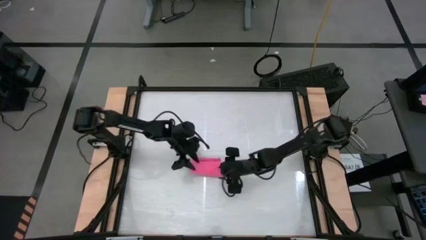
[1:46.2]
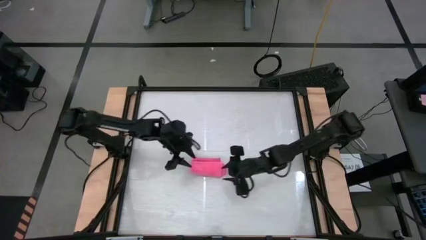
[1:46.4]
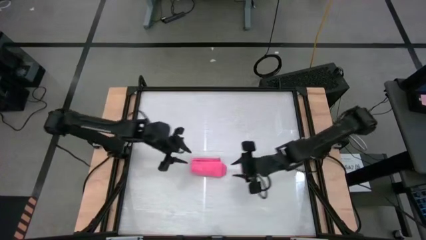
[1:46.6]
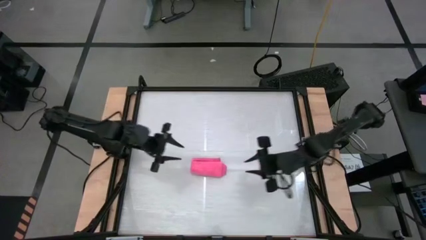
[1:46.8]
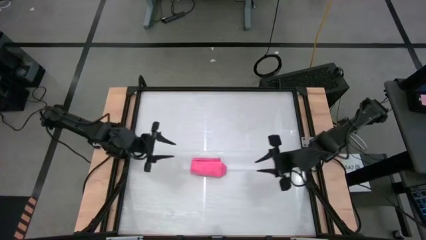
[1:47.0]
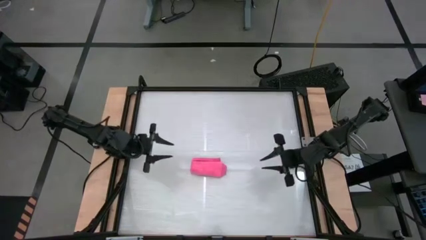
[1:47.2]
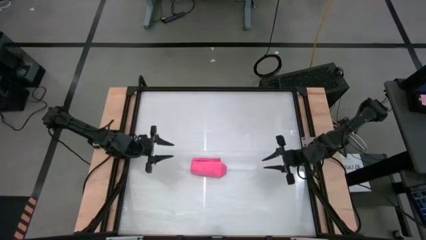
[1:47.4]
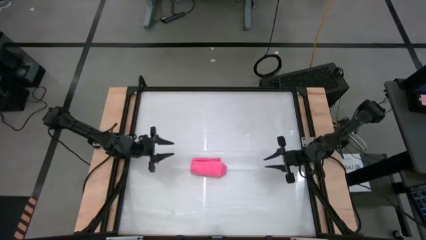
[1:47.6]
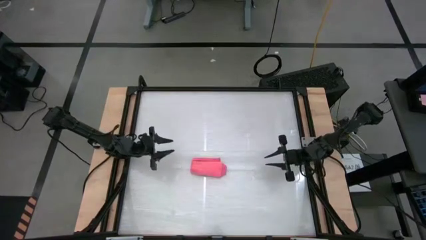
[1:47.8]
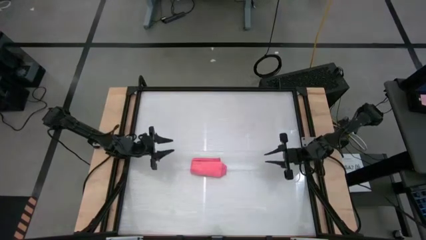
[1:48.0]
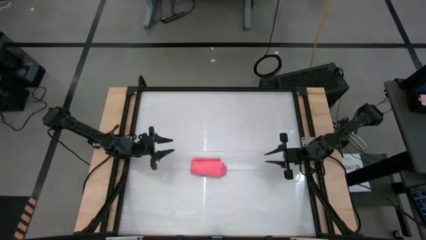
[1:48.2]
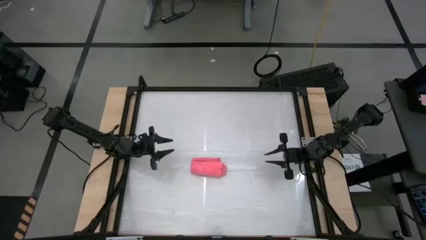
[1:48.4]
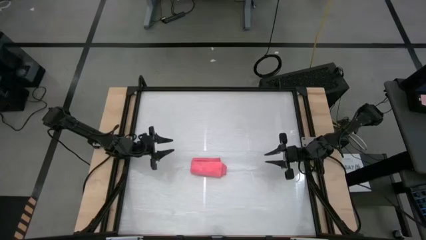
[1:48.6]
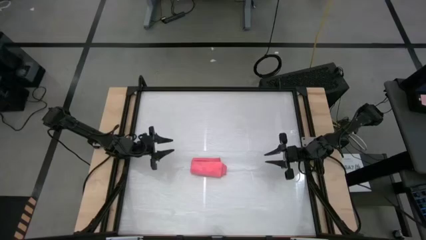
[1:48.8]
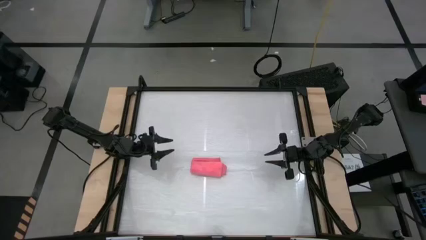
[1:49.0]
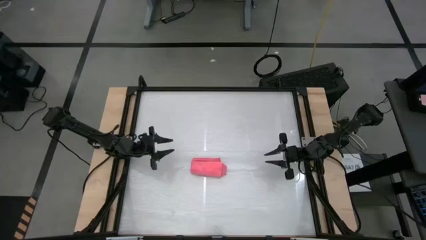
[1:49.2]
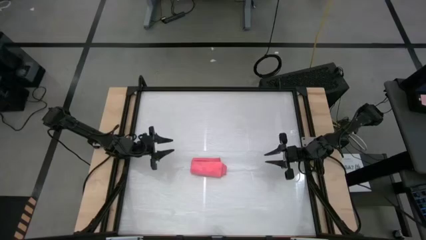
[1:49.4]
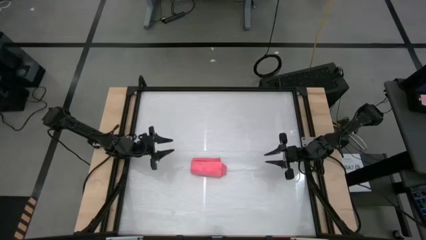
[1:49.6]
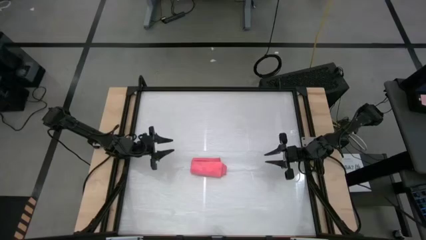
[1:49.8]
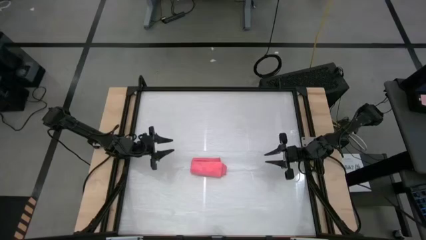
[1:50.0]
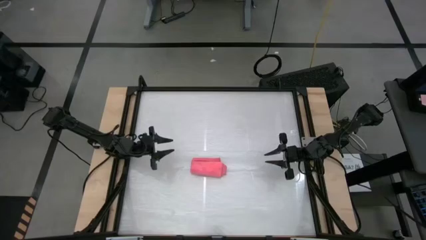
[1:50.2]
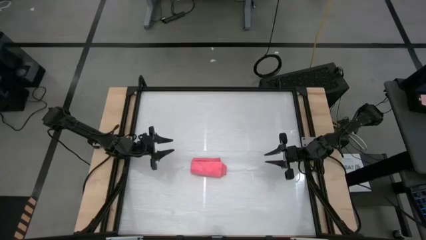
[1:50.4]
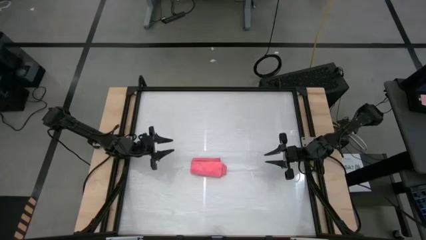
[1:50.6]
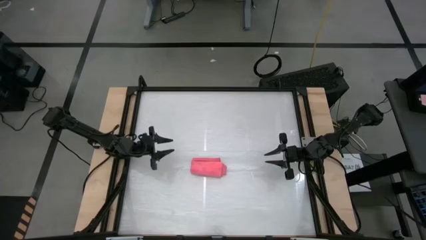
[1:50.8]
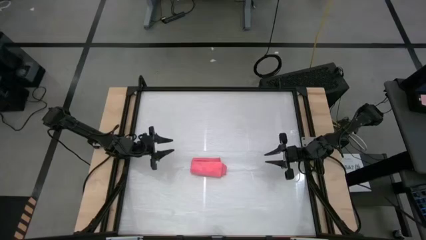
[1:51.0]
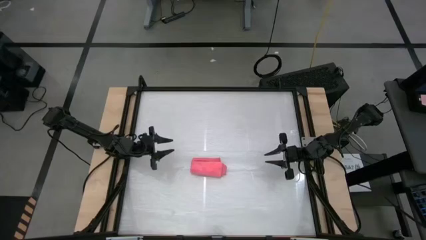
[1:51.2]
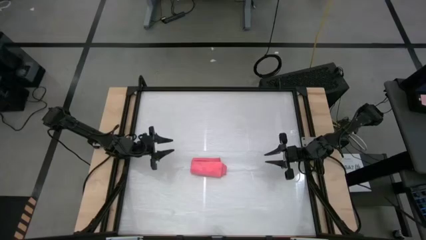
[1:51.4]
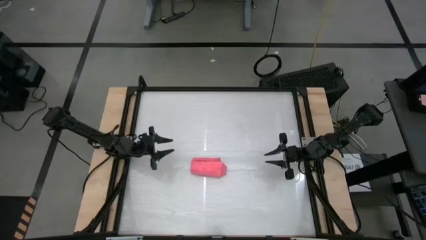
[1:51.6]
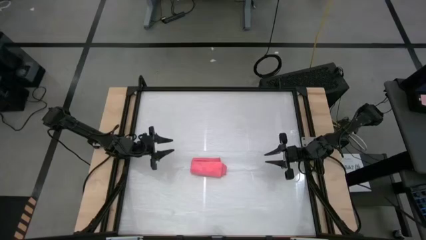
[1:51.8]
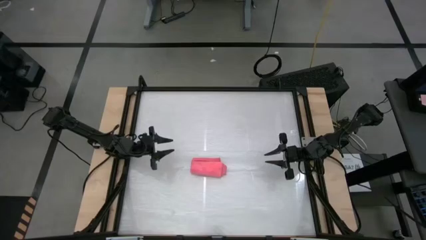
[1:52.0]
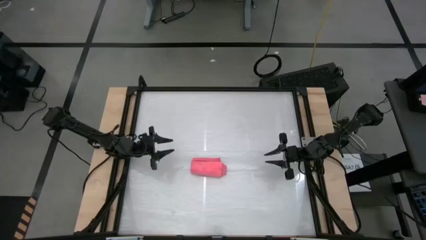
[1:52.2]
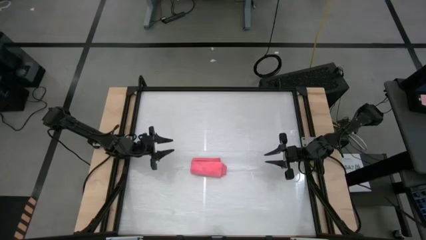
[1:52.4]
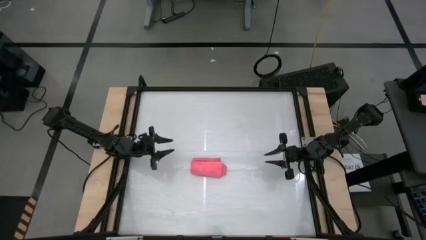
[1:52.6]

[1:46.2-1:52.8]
Task: Roll towel
Return to Home Position

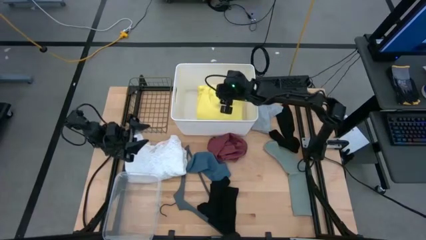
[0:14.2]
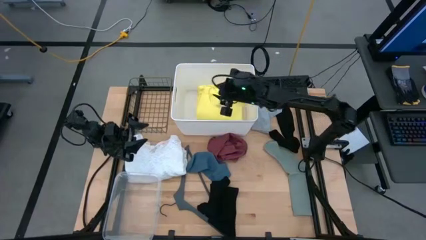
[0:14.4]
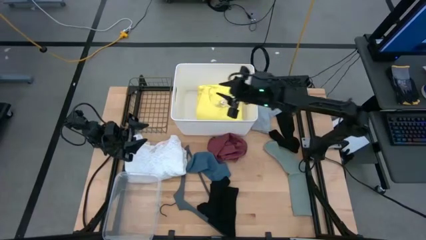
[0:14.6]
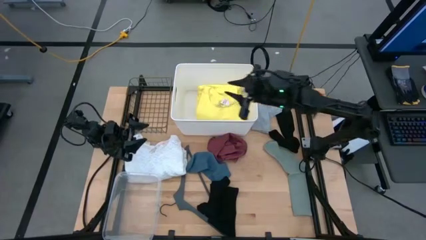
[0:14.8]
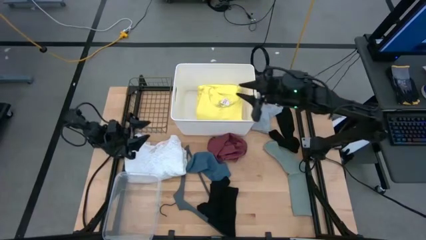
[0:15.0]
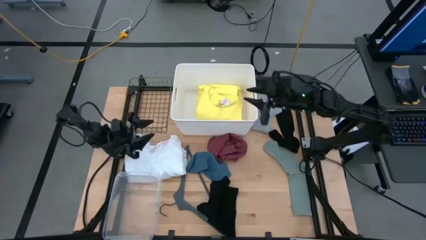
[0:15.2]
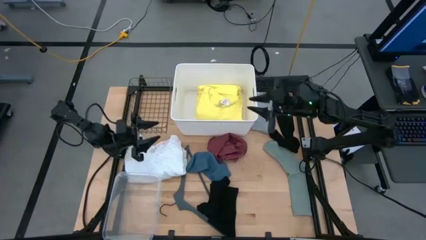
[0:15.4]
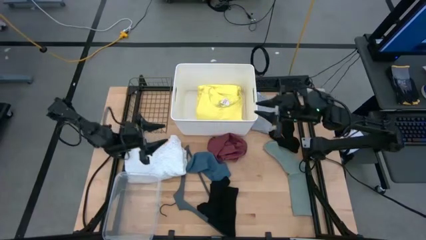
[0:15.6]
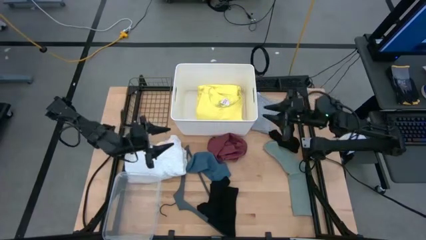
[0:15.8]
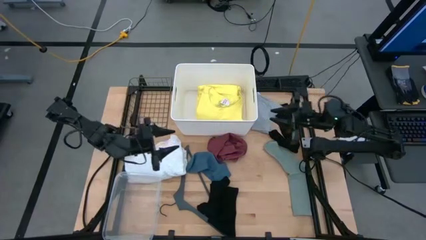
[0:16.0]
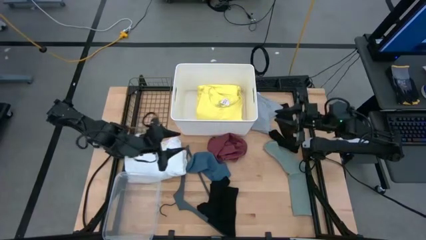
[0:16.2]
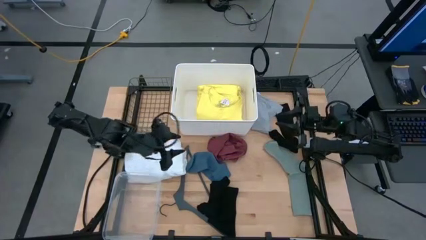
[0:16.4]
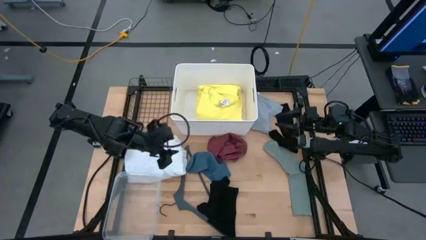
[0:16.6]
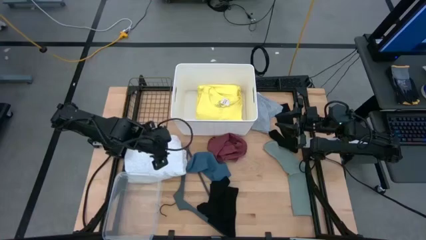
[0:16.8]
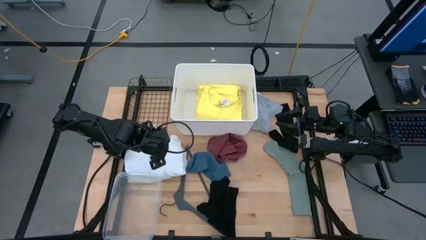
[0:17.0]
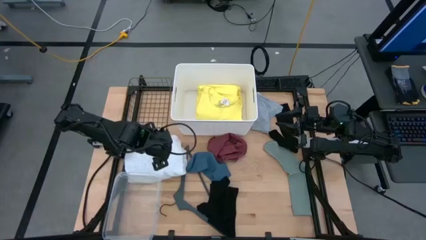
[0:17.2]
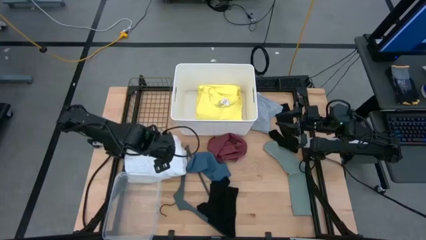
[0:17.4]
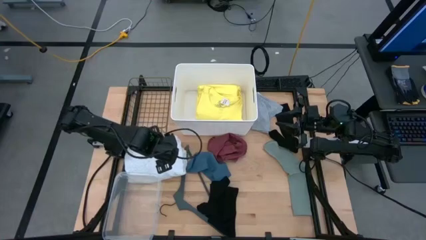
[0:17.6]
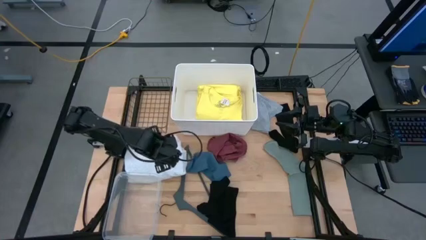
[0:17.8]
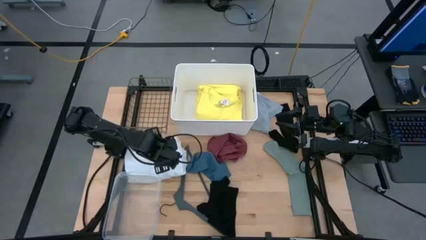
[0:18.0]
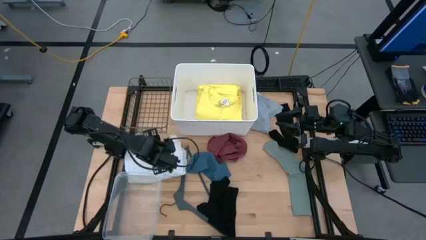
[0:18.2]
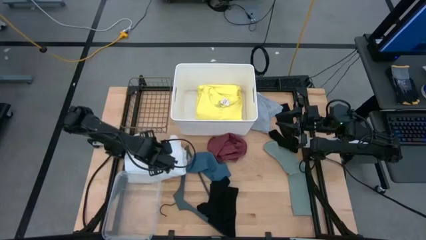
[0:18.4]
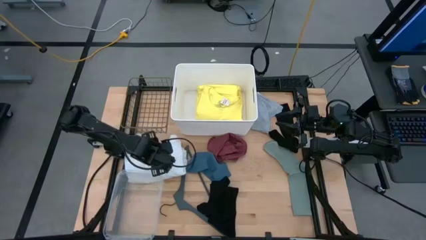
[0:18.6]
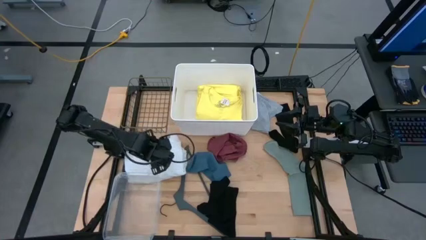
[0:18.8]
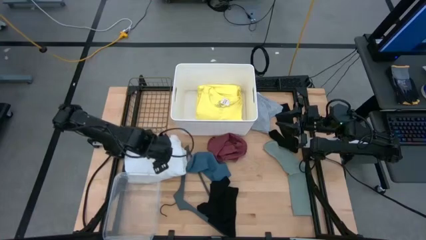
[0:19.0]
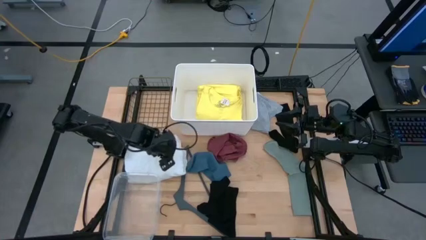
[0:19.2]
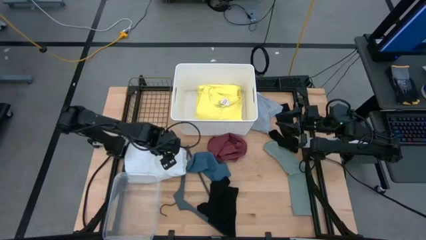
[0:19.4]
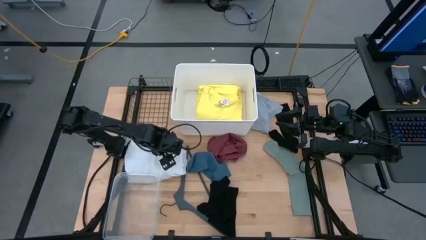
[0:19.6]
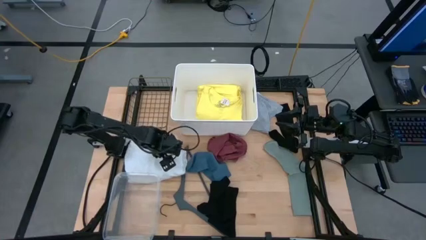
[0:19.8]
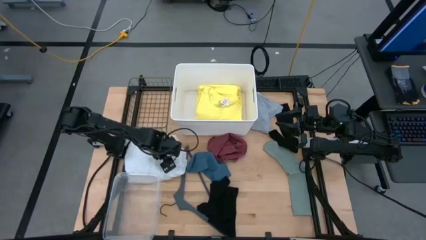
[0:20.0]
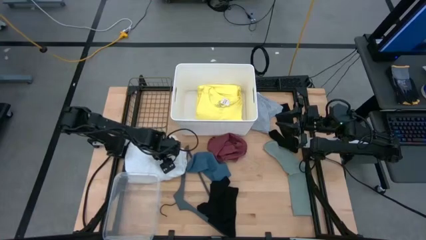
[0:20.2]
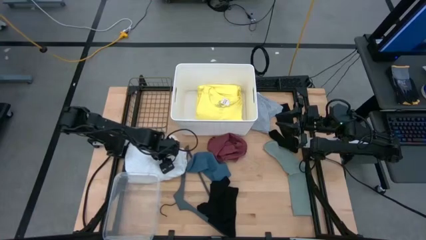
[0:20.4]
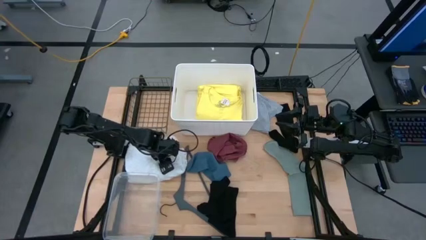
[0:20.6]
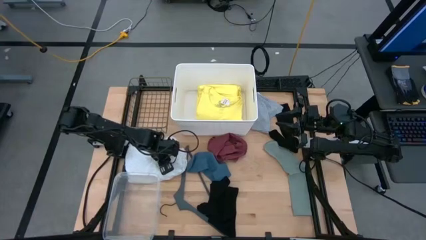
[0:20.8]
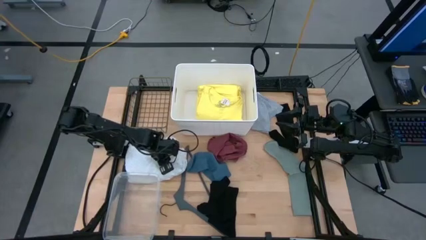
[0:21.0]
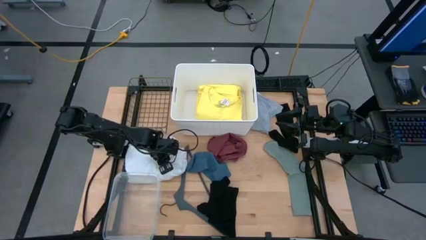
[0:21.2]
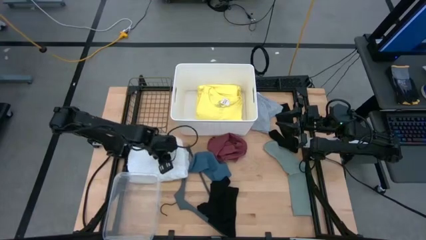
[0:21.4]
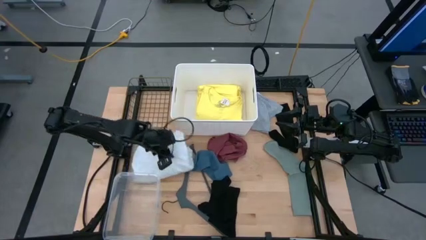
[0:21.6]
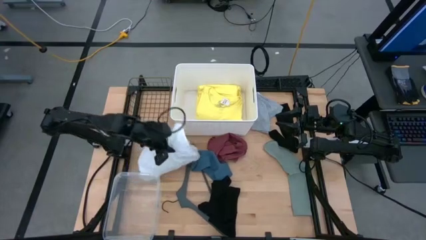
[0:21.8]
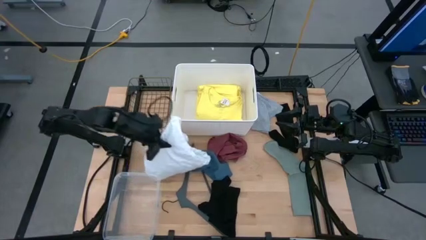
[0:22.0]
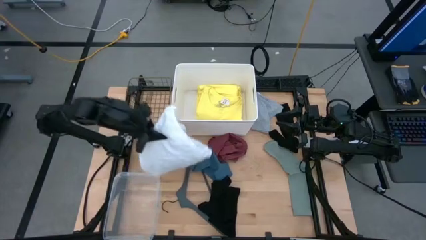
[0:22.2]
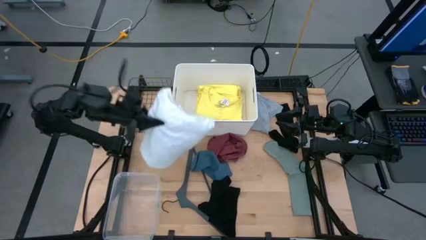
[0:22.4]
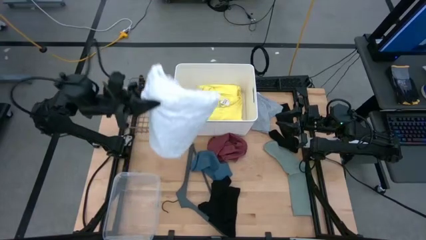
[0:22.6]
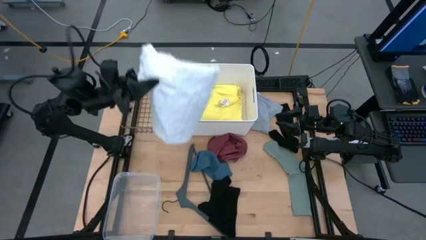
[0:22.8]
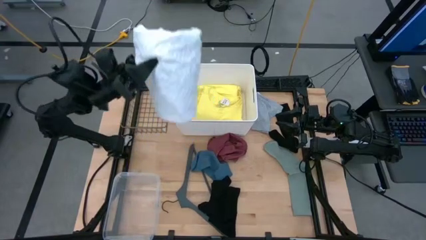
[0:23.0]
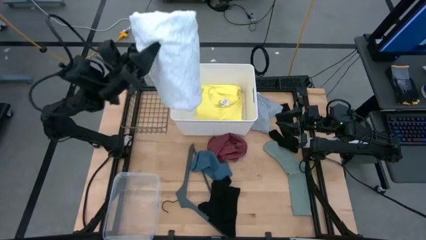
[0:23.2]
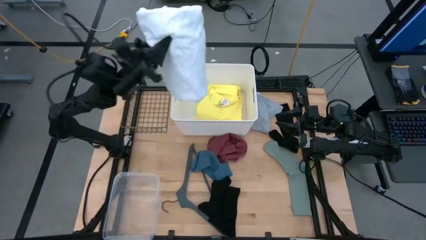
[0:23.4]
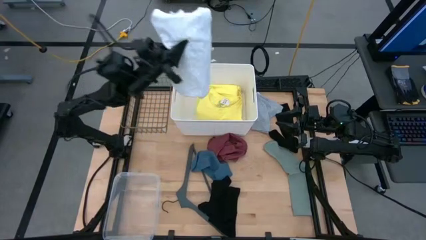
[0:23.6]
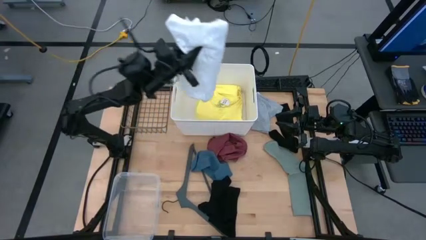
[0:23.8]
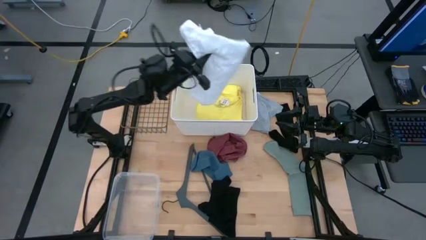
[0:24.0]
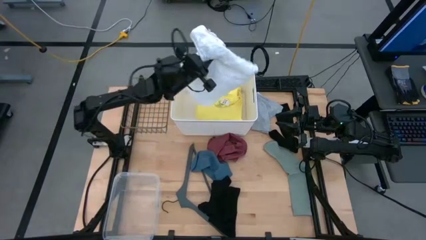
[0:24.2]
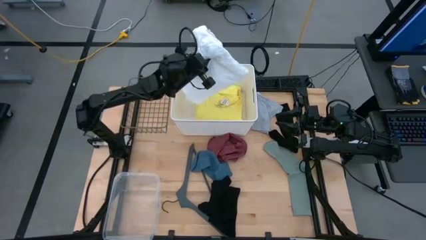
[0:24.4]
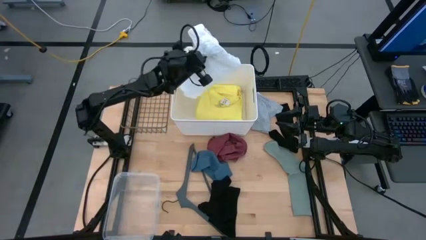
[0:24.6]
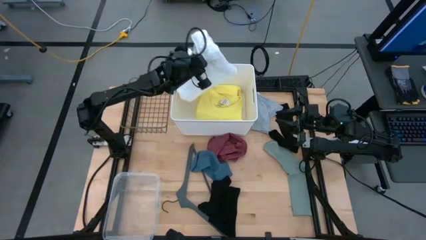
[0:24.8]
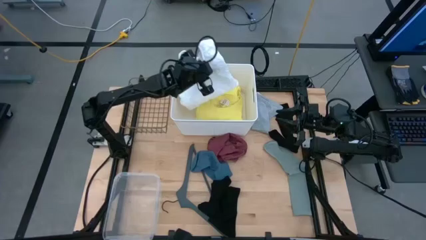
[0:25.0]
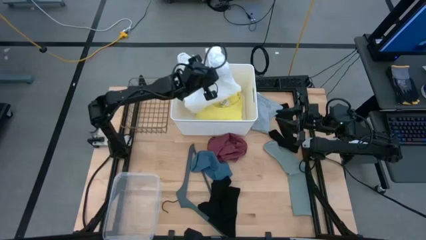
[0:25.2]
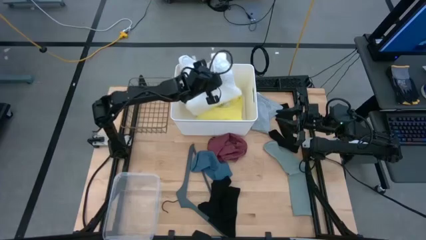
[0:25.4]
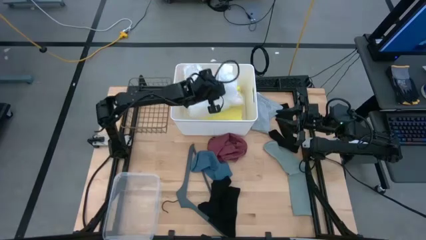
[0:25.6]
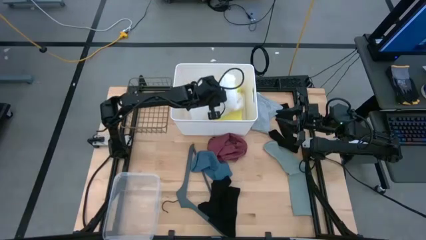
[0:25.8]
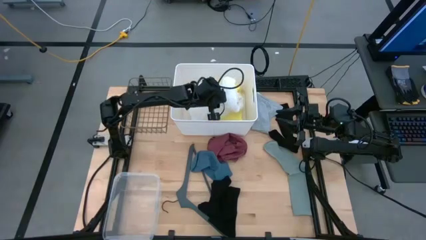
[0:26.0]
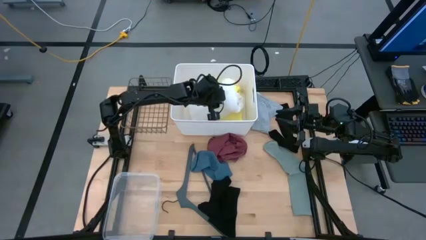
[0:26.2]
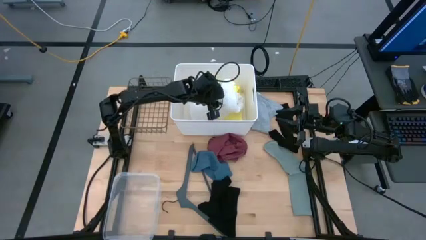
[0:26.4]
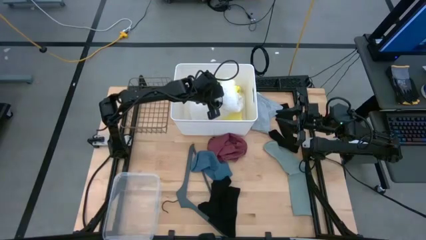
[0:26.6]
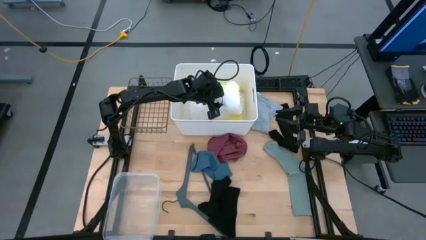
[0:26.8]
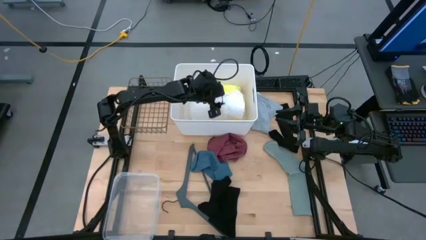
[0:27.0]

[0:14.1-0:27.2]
Task: Pick & Place Cloths
Put the white shirt into the white bin
